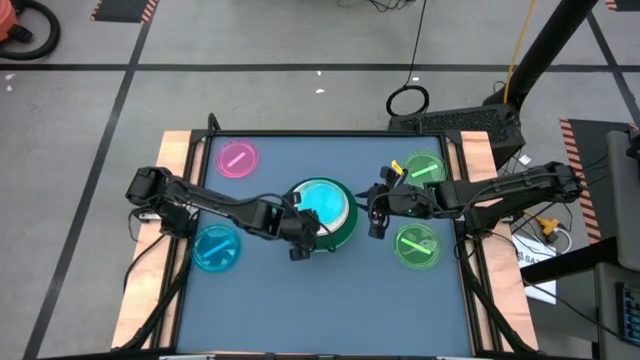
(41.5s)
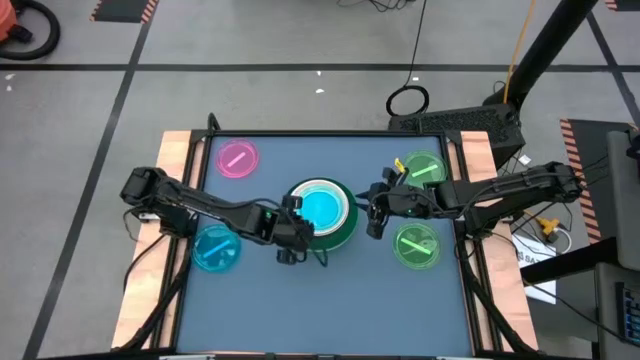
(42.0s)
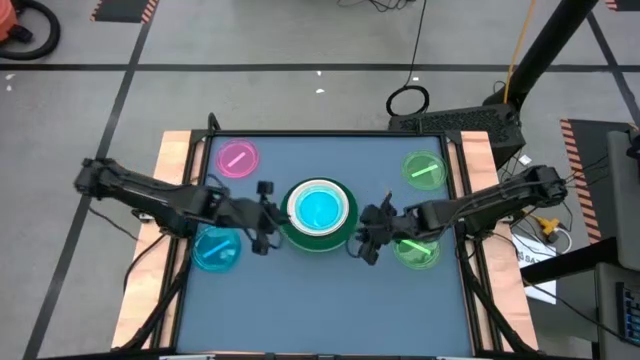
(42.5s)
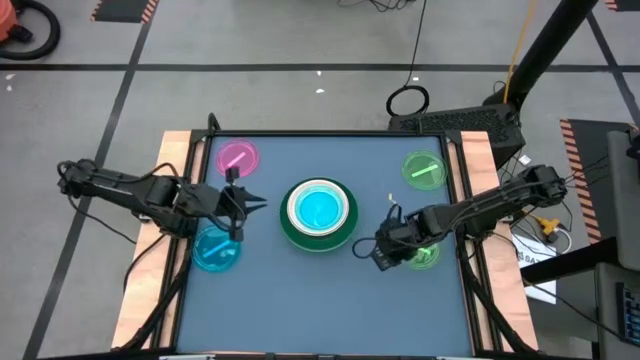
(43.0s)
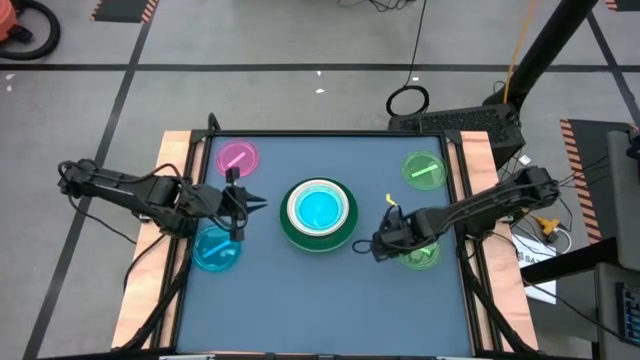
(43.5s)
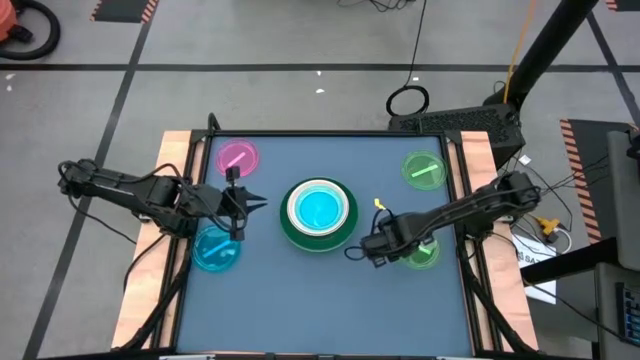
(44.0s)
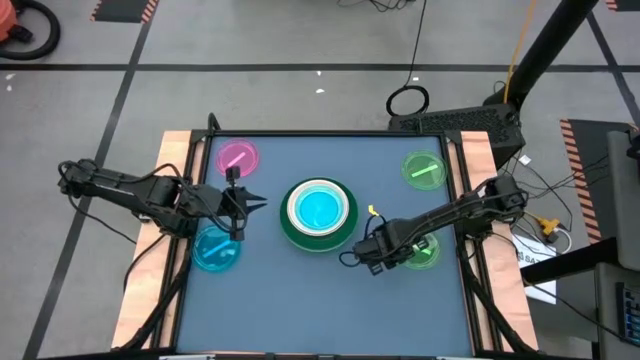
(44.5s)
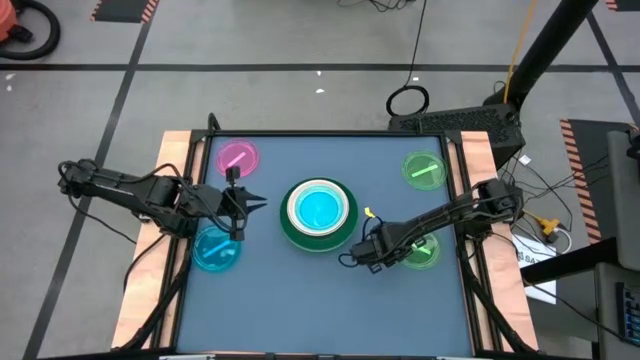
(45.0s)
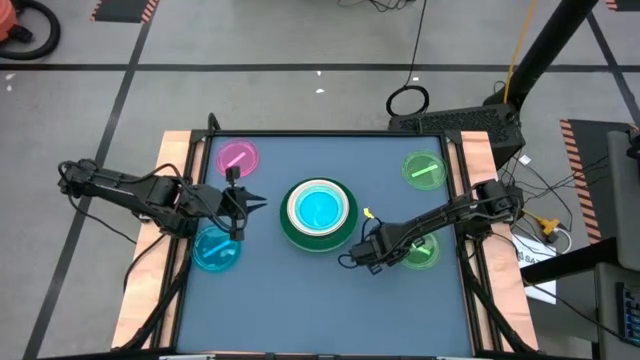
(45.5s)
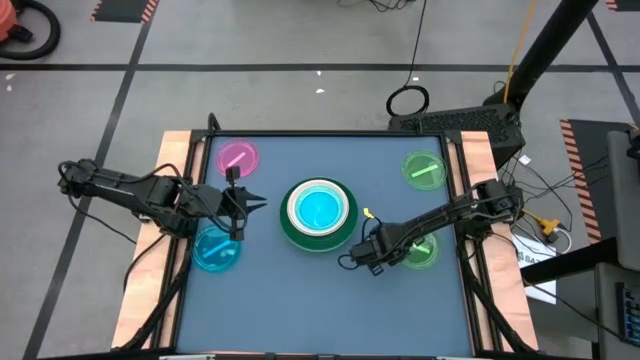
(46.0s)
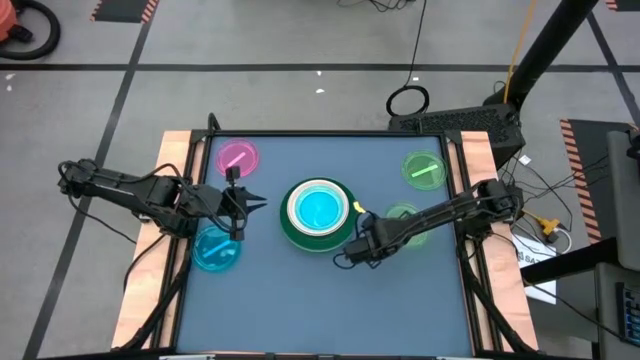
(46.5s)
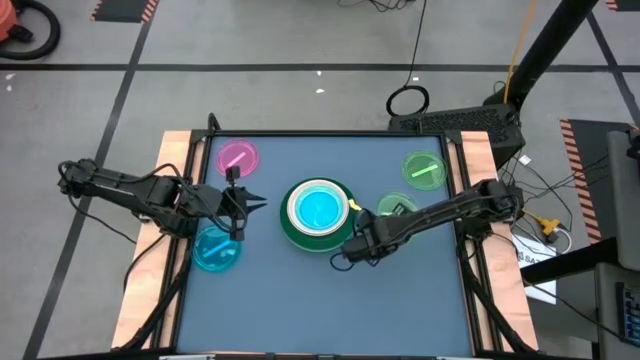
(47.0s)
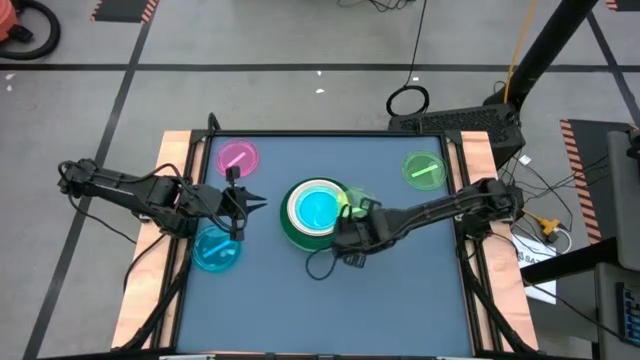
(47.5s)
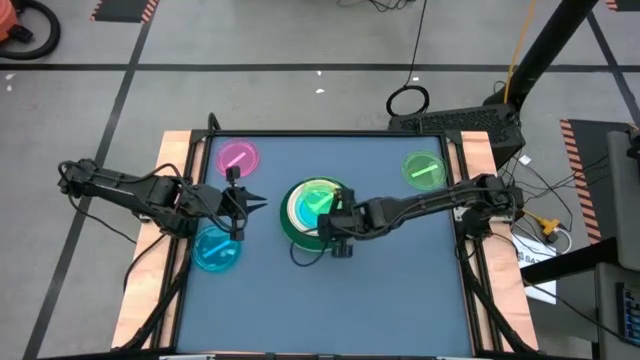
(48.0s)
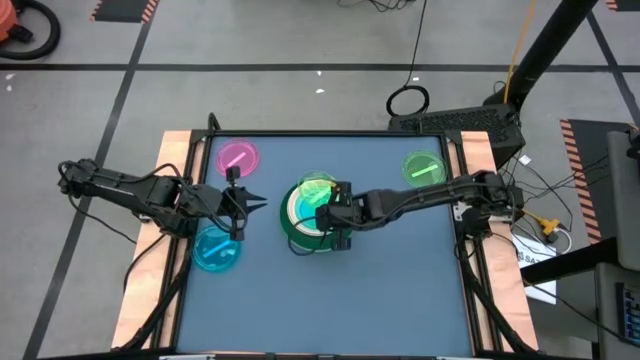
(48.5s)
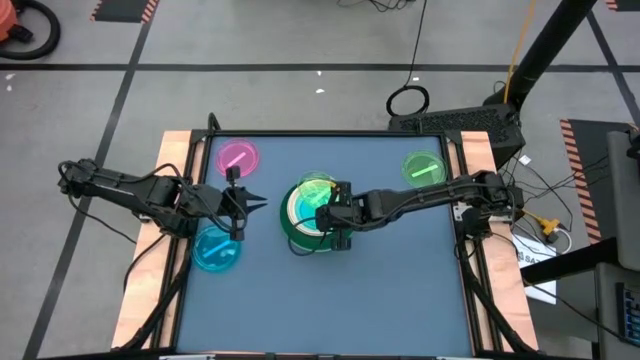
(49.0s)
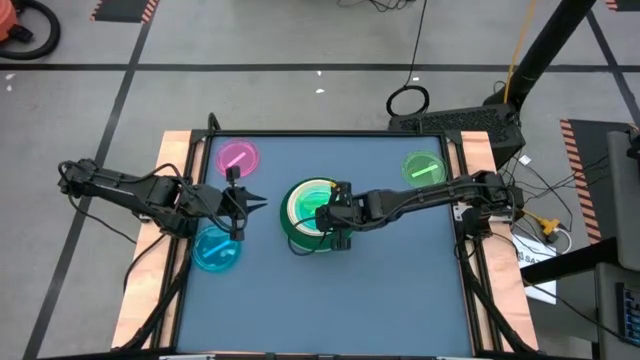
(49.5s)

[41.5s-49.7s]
Task: Stack plastic plates
Stack the bottom transparent green plate on top of the transparent blue plate

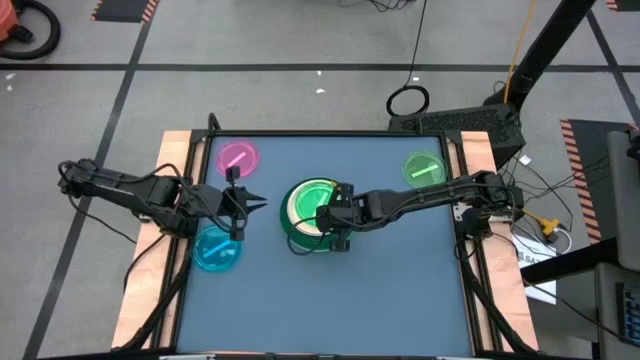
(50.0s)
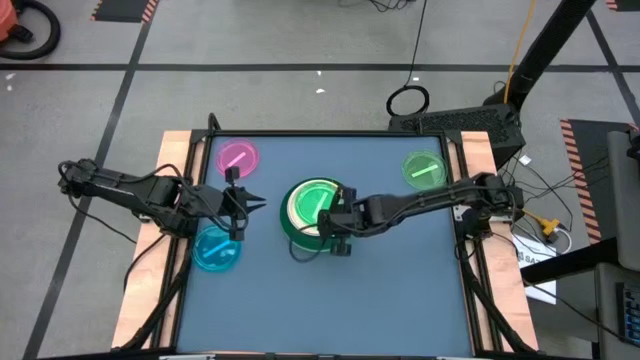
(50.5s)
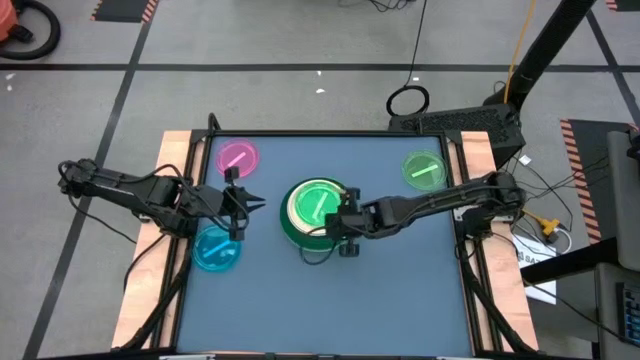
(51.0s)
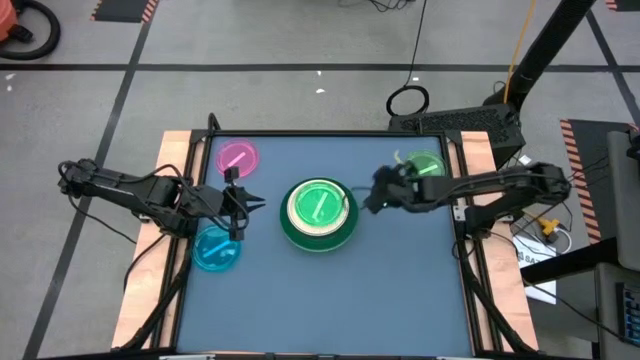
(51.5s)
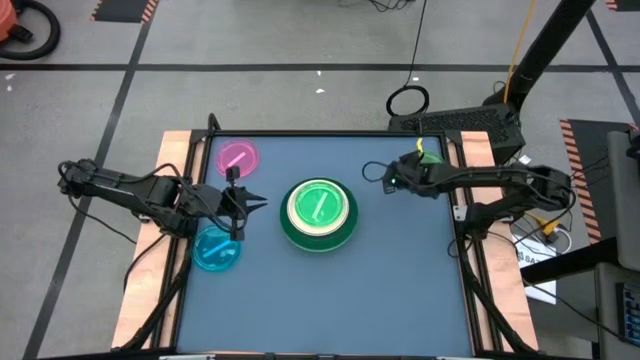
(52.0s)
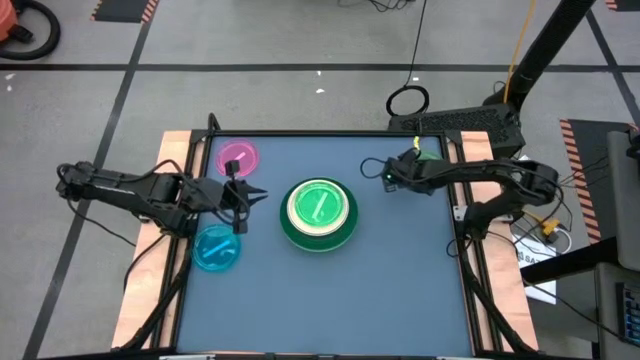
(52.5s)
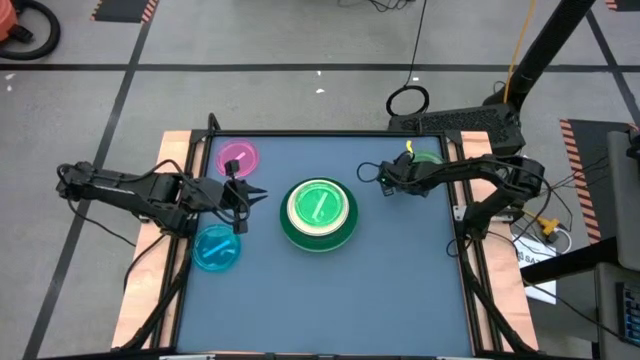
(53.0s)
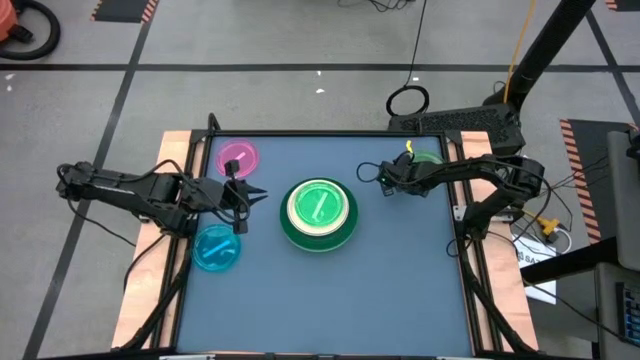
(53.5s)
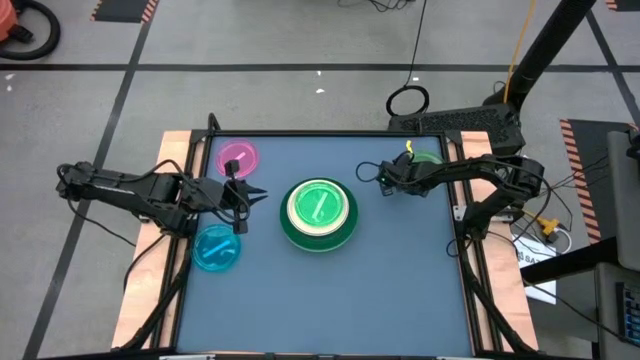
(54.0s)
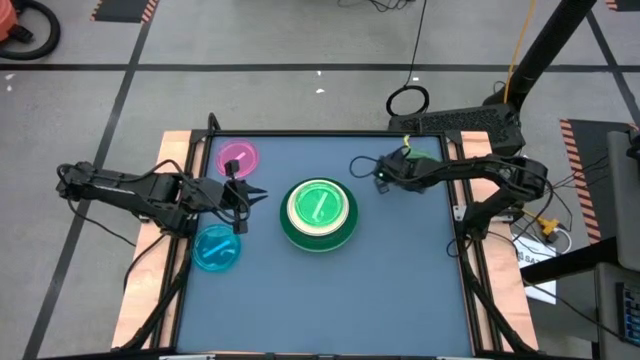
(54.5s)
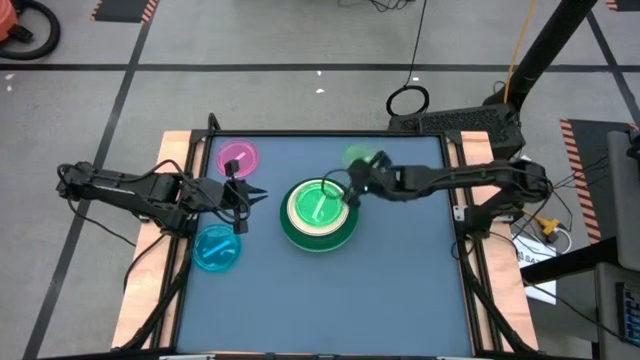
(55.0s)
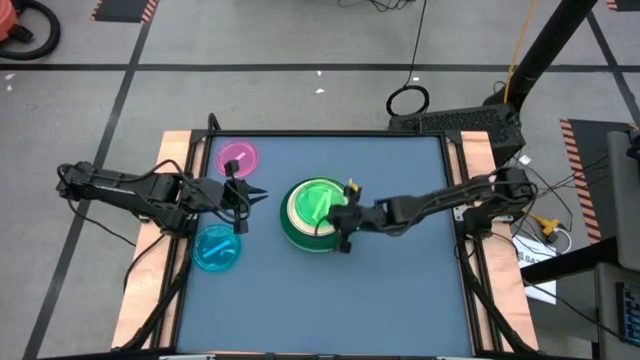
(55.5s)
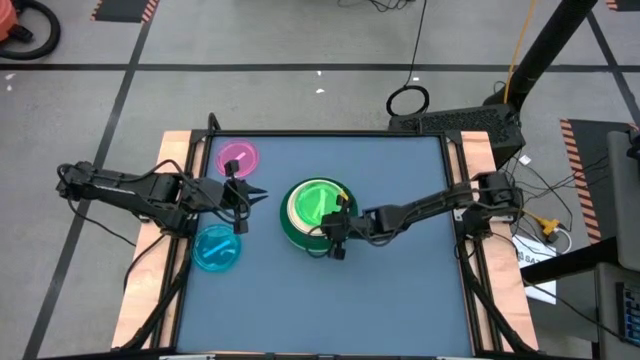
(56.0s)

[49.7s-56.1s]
Stack the transparent green plate on top of the transparent green plate

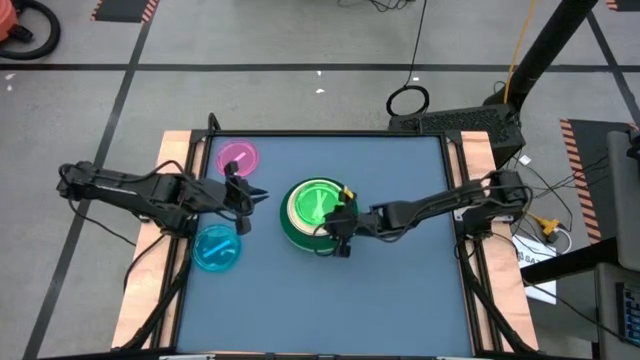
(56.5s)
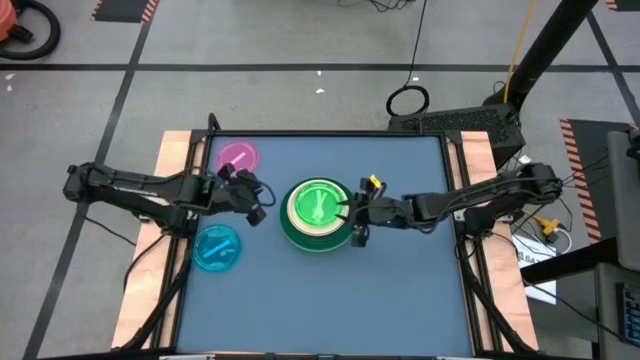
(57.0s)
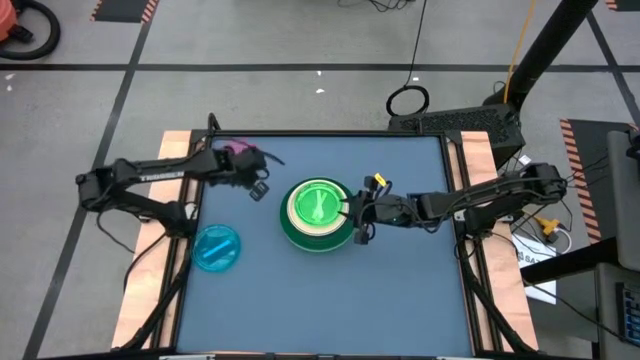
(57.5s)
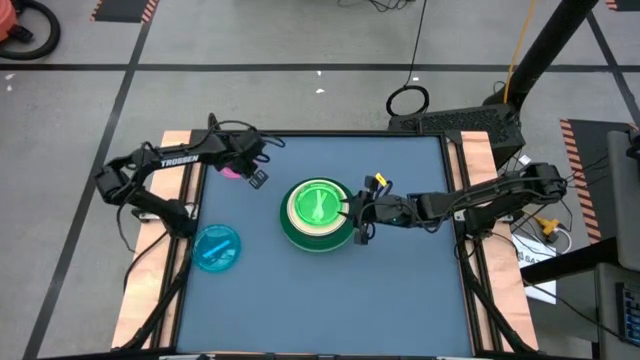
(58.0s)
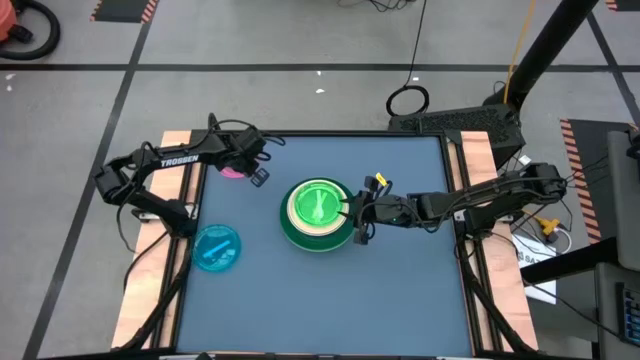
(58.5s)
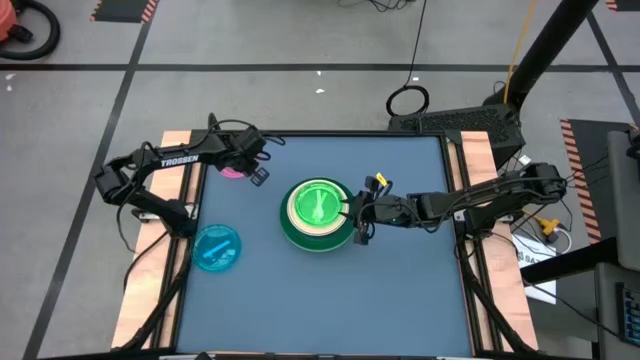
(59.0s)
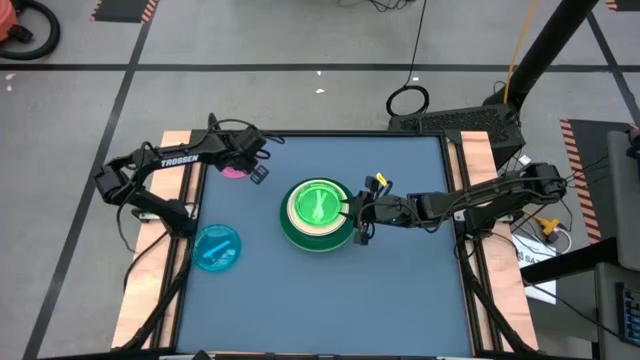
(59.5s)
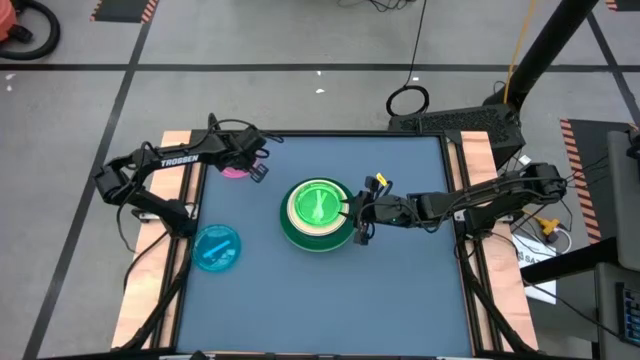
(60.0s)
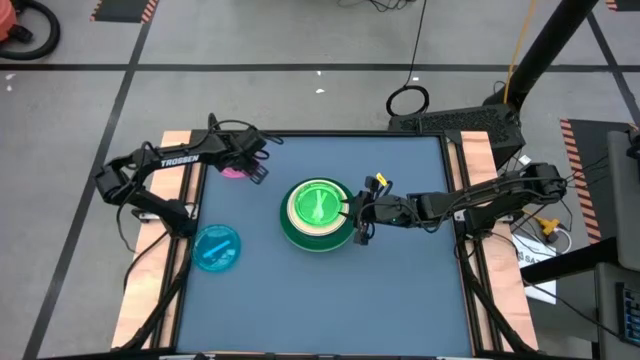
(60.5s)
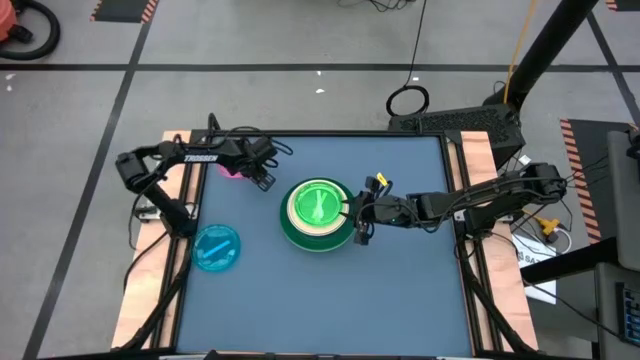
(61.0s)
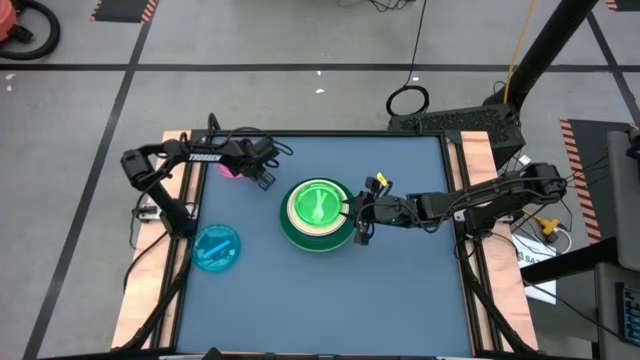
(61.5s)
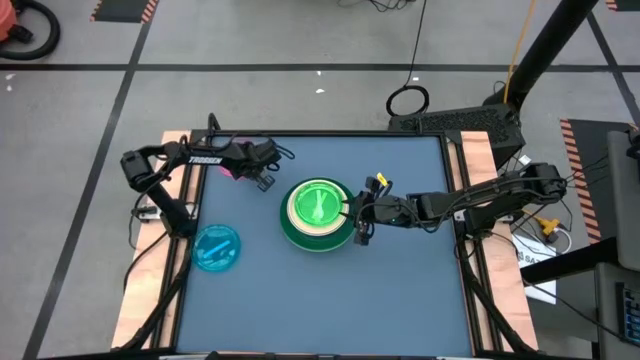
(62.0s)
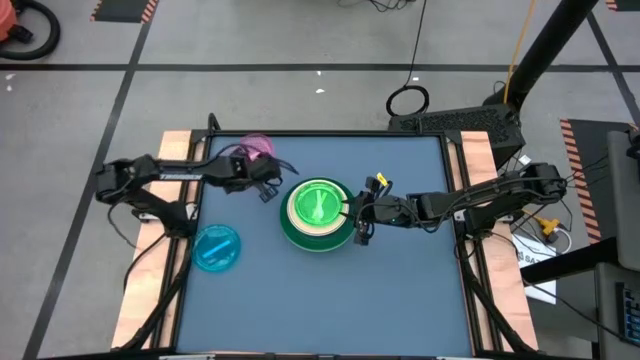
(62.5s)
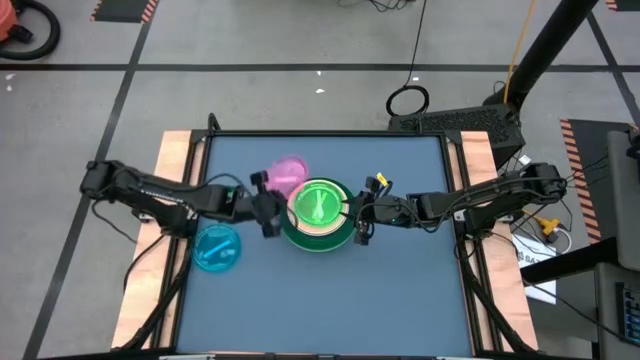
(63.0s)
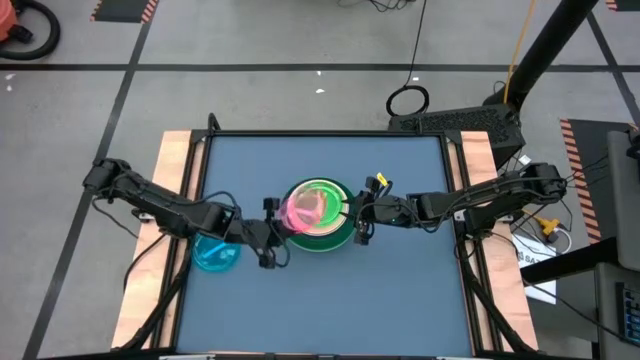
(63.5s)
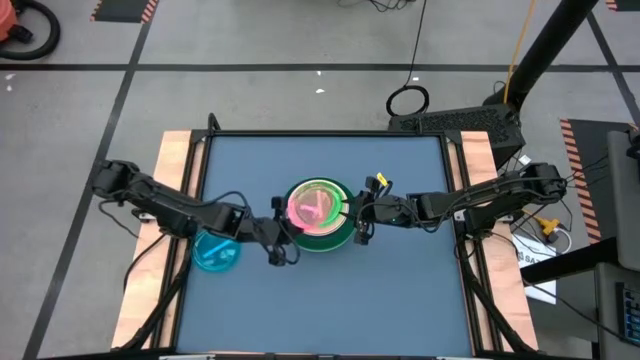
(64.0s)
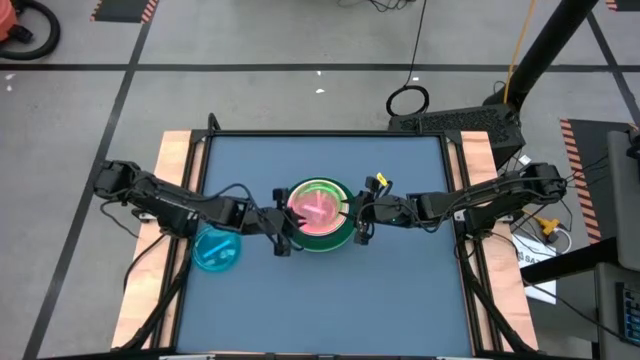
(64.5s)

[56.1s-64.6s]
Stack the transparent pink plate on top of the transparent green plate
